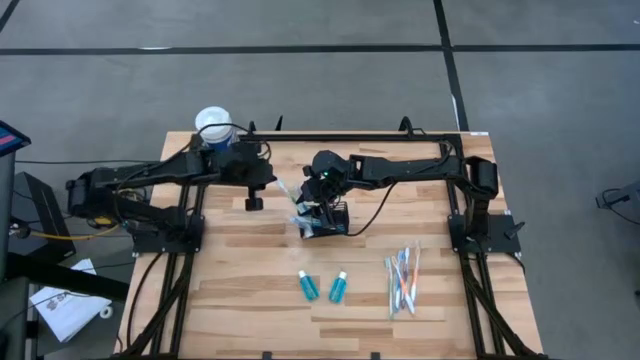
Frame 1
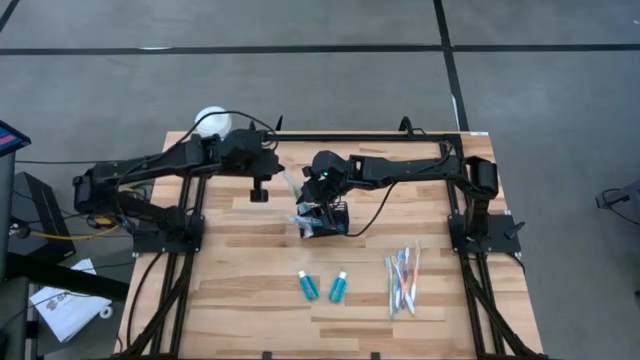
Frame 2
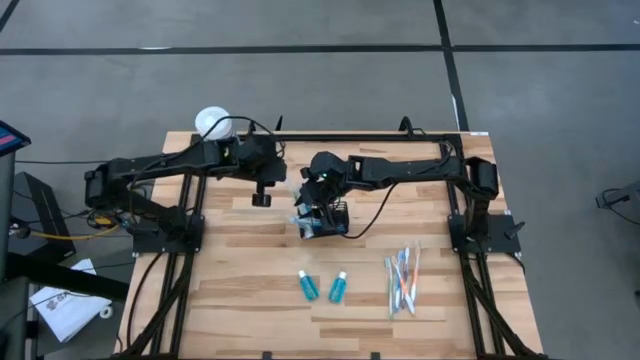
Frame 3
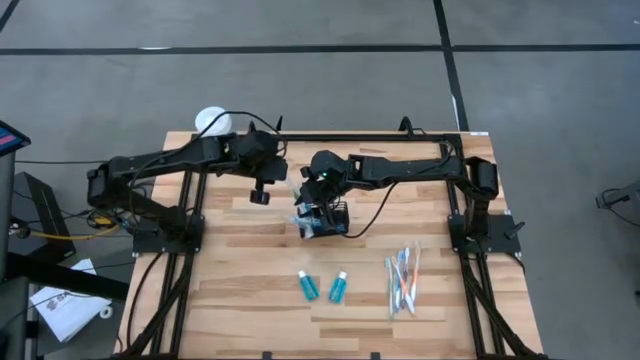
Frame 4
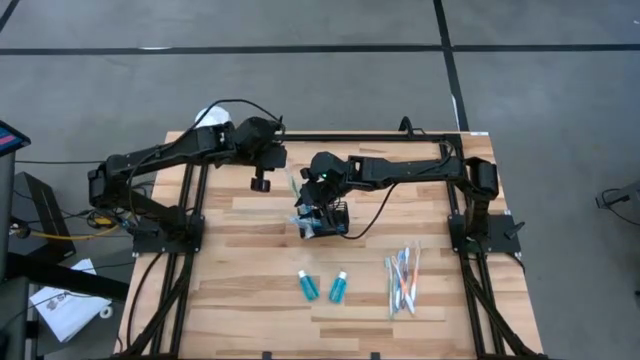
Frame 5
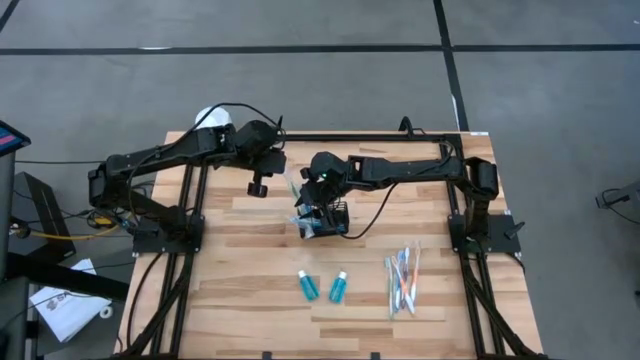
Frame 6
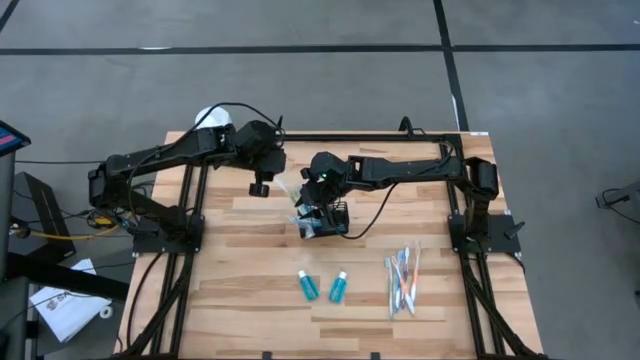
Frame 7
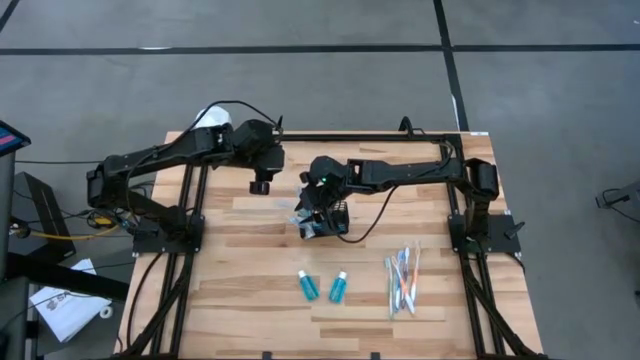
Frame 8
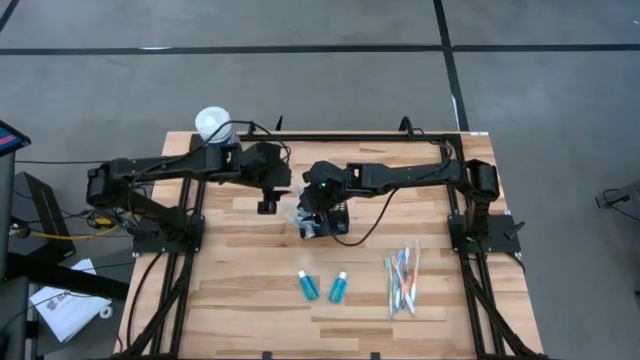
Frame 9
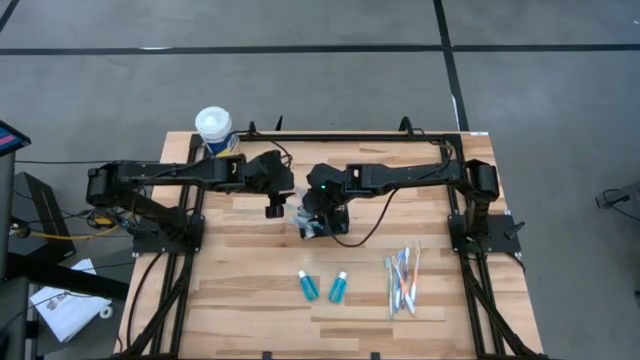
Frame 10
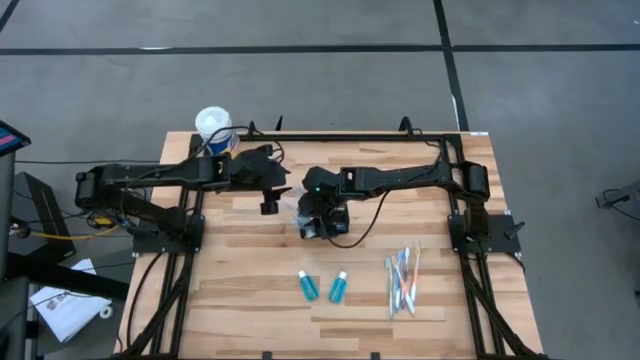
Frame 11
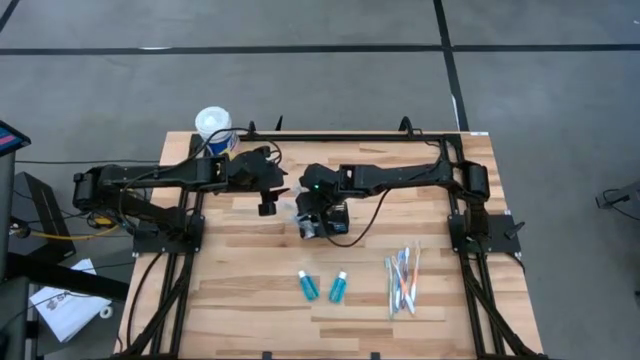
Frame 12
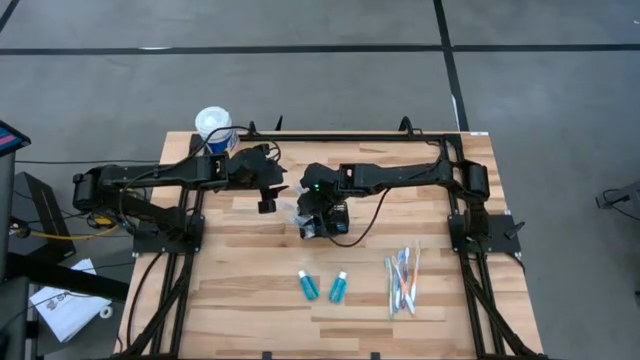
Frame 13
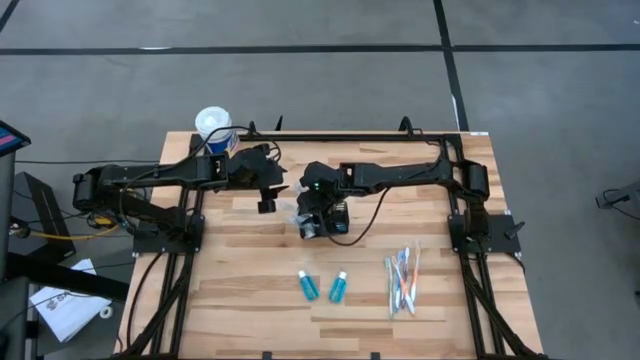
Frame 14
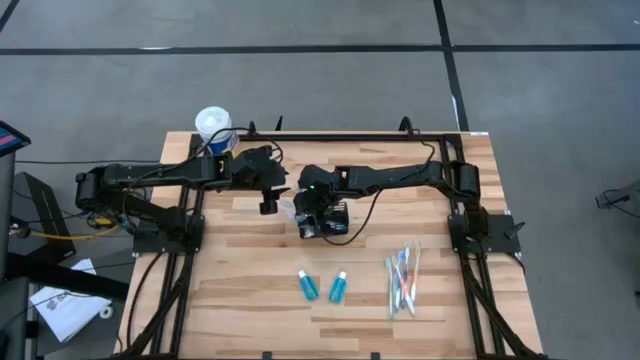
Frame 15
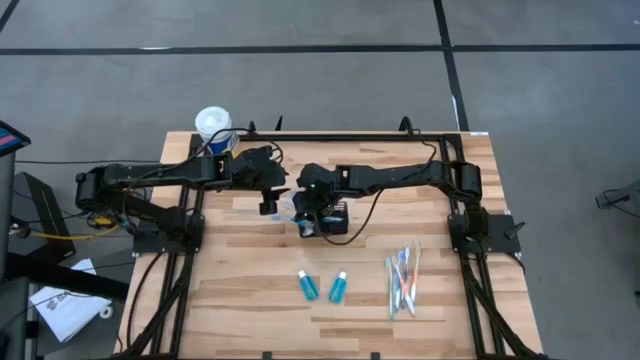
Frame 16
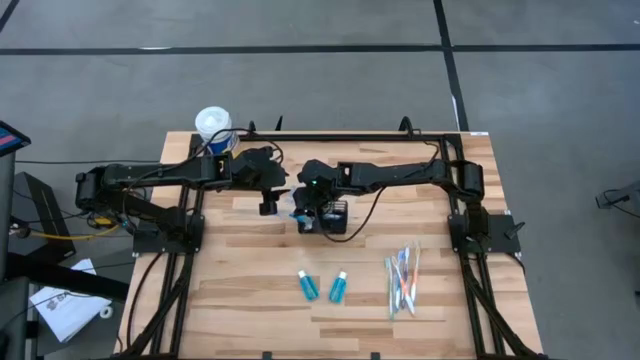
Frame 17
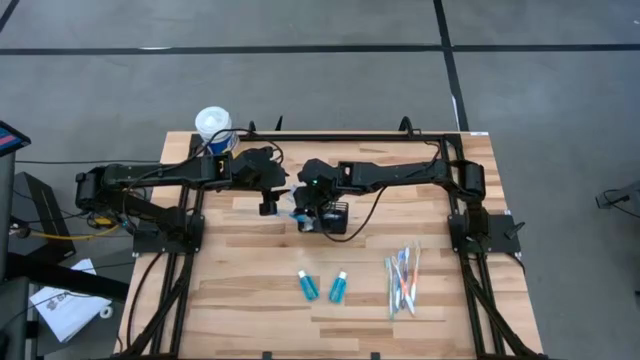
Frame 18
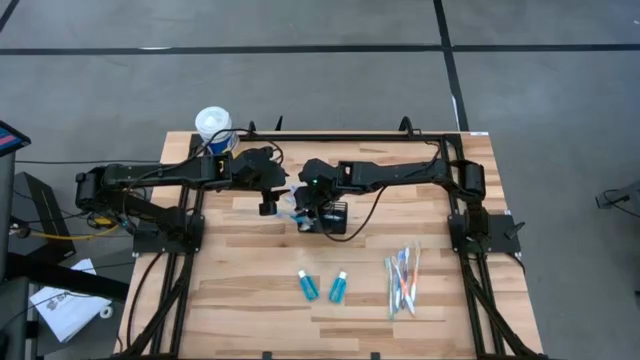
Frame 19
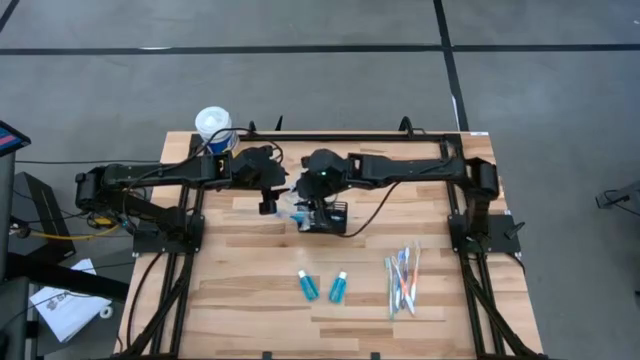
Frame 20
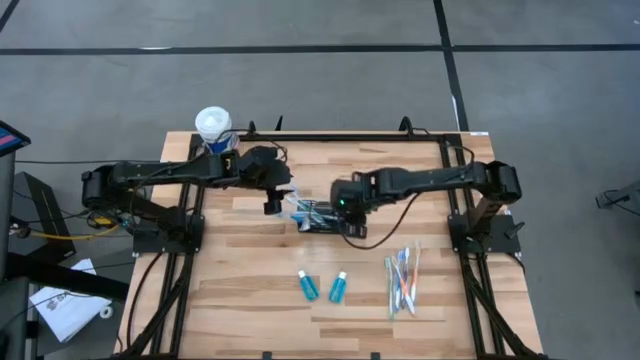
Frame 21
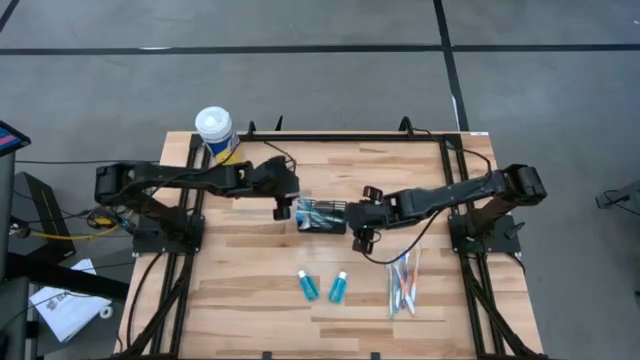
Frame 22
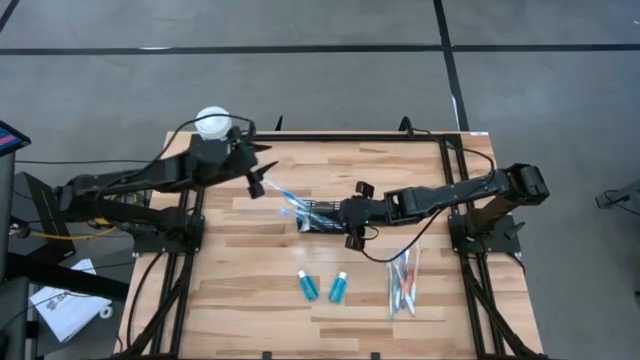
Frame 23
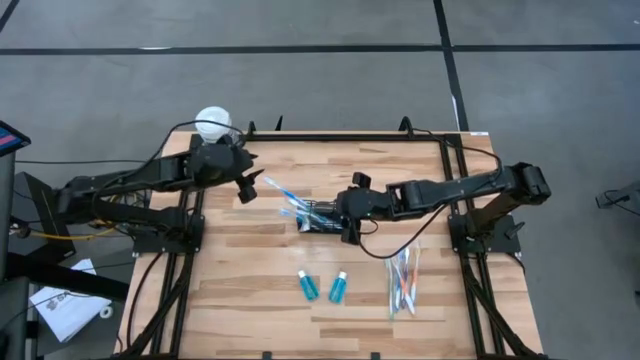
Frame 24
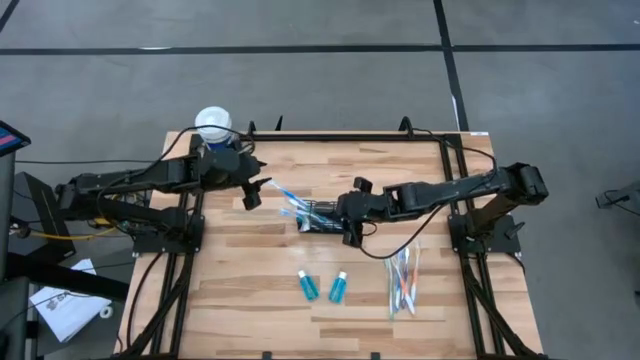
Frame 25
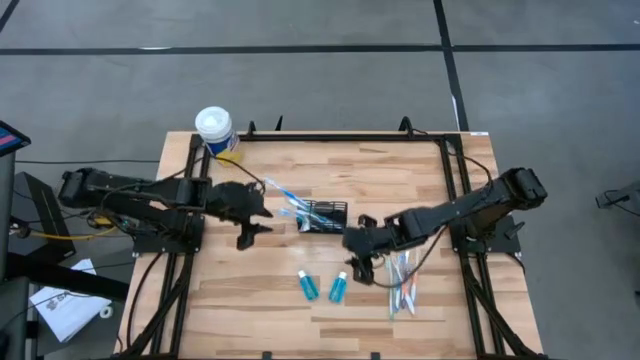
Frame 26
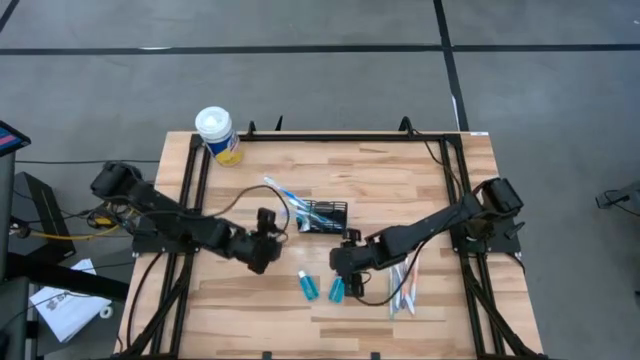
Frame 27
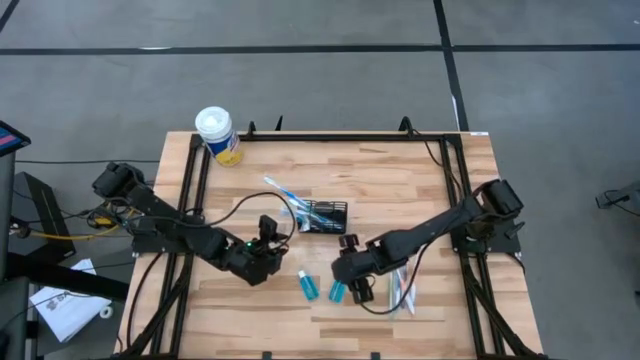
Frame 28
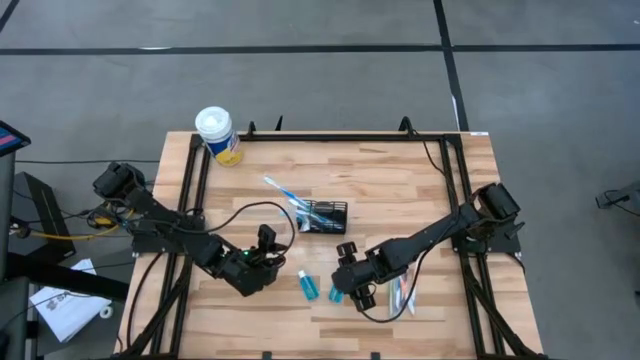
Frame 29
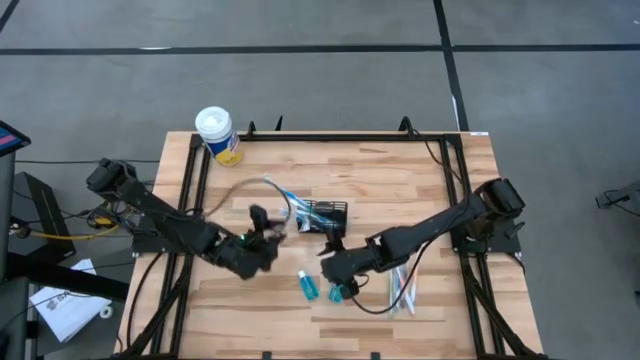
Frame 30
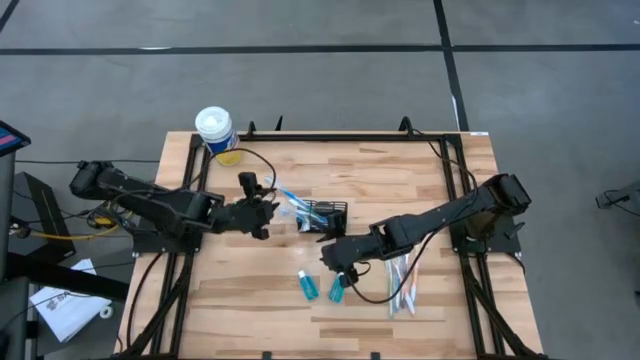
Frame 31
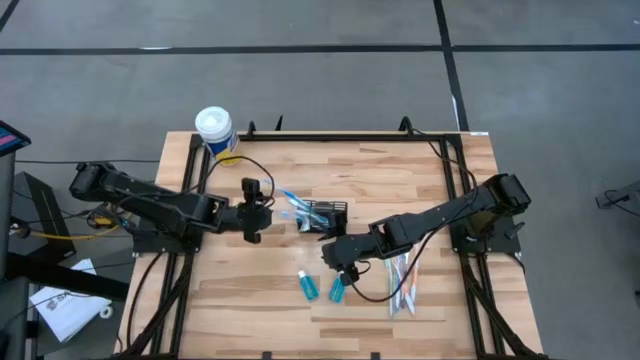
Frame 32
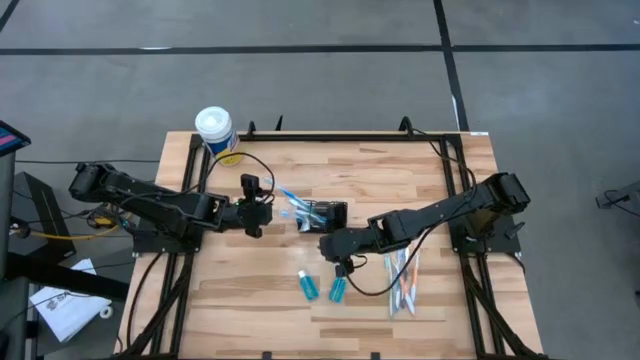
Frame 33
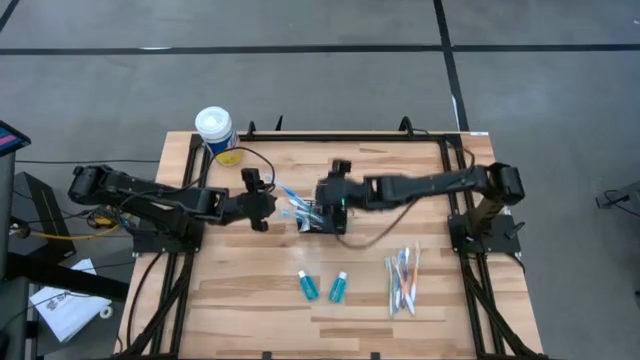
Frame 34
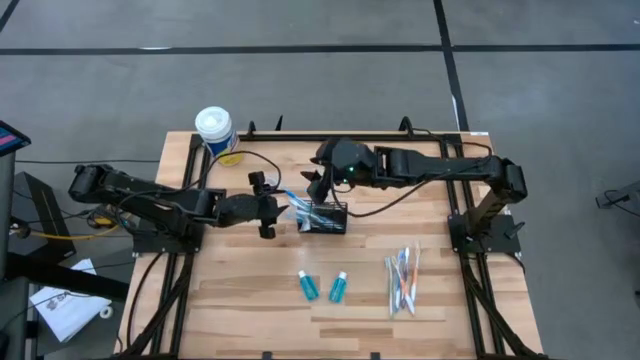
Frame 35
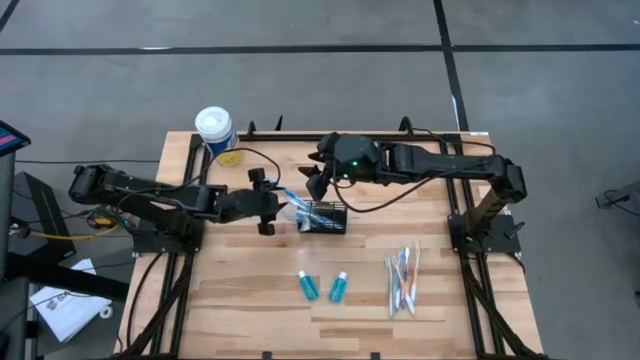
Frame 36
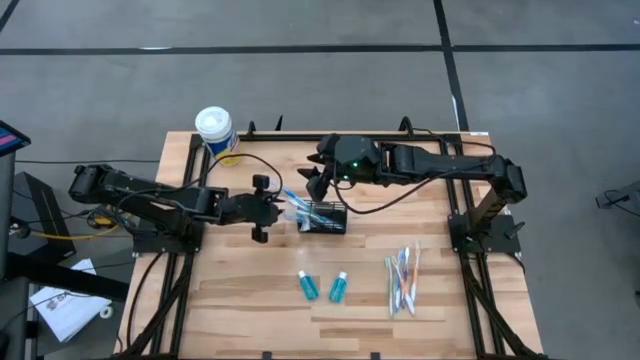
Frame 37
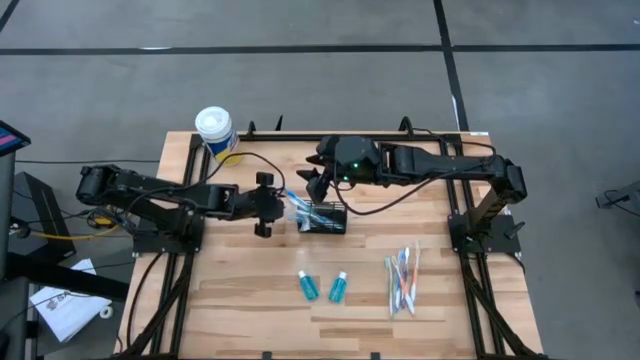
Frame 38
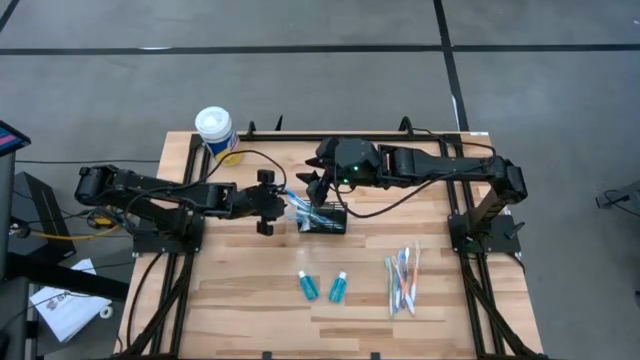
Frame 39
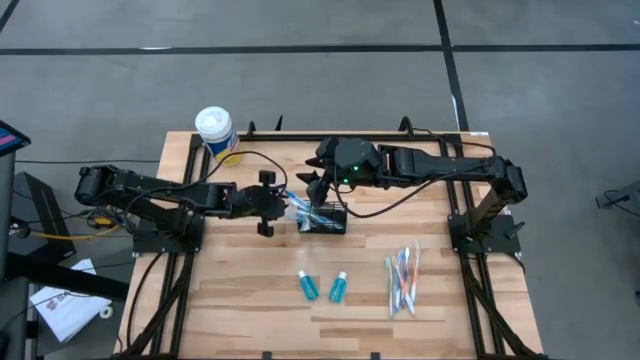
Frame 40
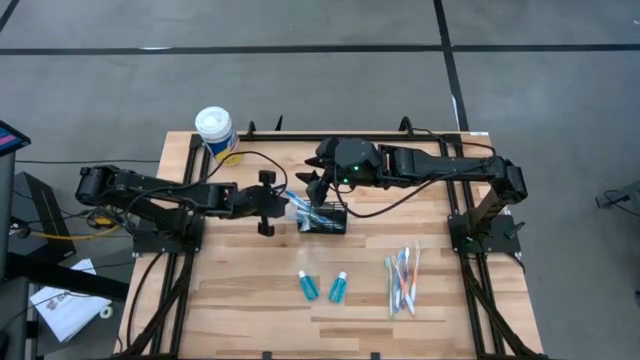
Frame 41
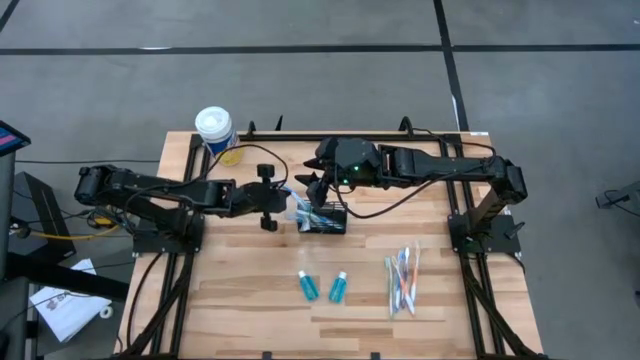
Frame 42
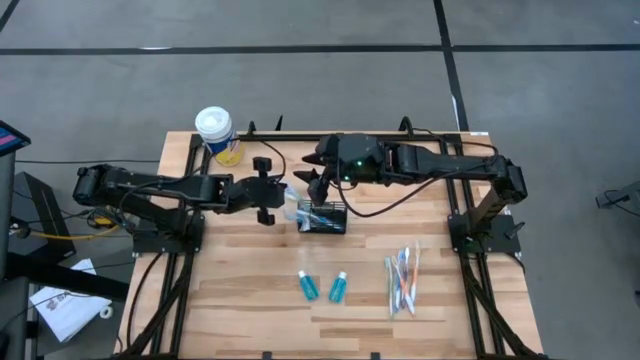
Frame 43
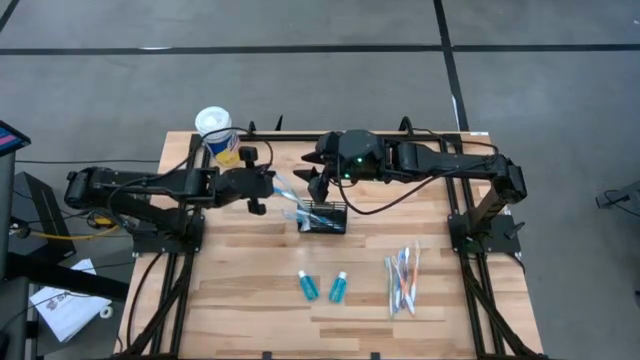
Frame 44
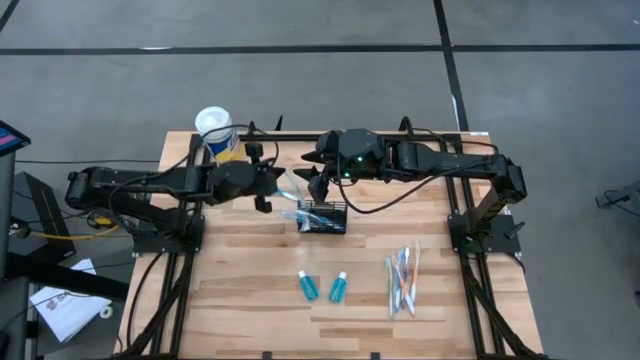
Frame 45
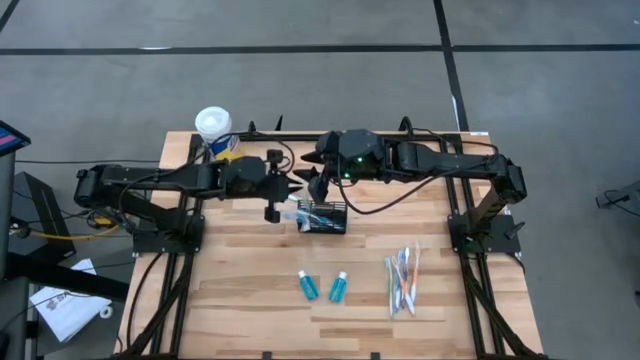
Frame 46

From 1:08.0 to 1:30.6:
Task: Pick & Place toothbrushing station
Adjust toothbrushes inside the mesh
